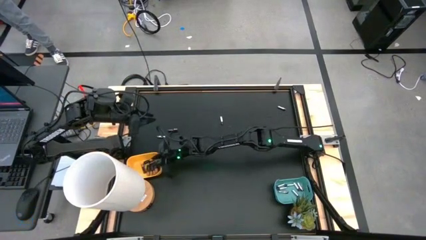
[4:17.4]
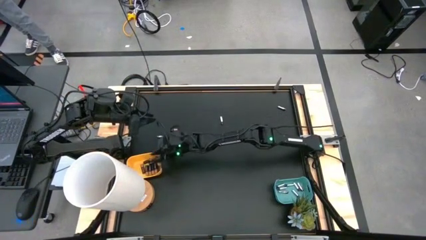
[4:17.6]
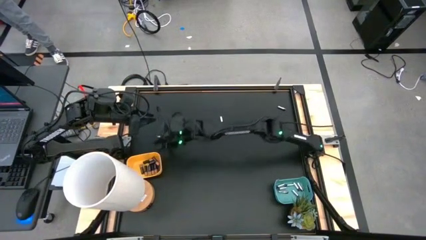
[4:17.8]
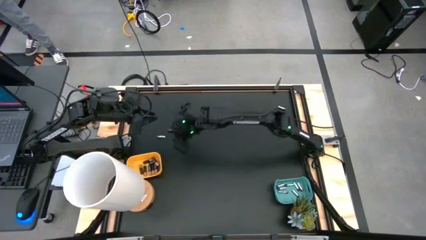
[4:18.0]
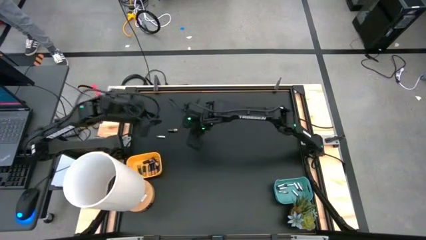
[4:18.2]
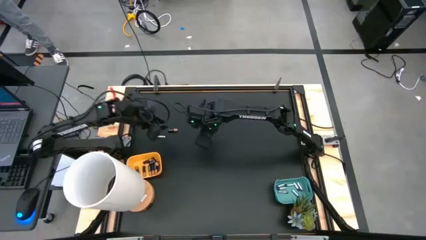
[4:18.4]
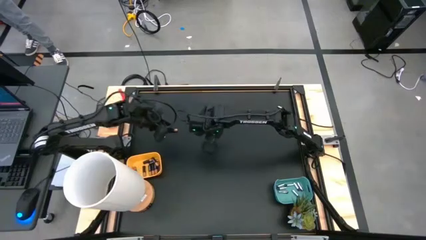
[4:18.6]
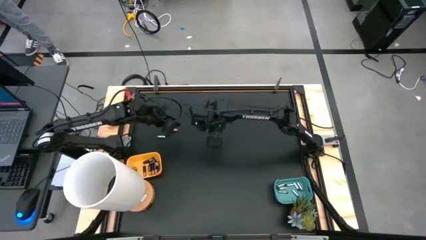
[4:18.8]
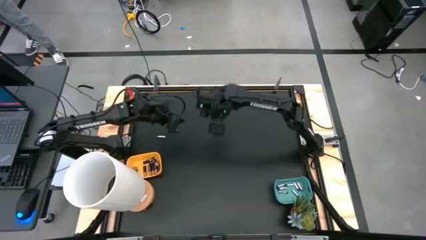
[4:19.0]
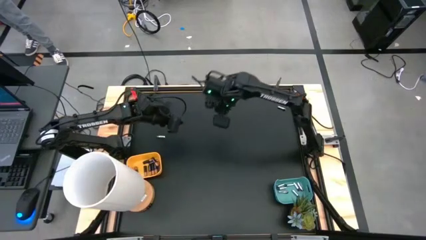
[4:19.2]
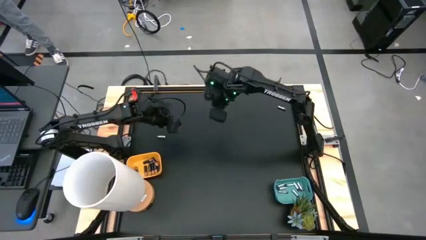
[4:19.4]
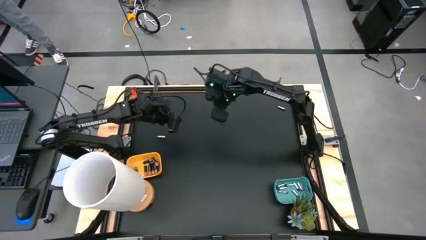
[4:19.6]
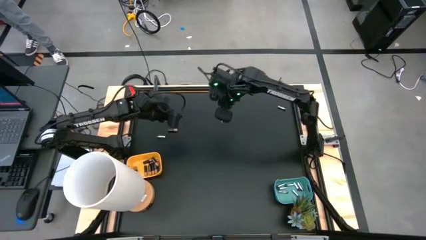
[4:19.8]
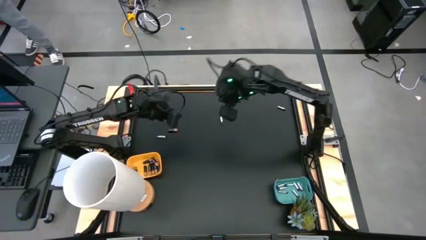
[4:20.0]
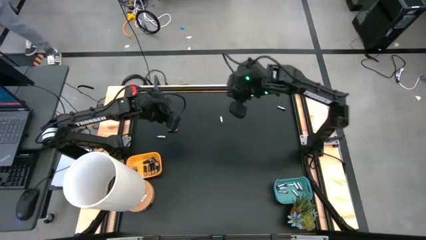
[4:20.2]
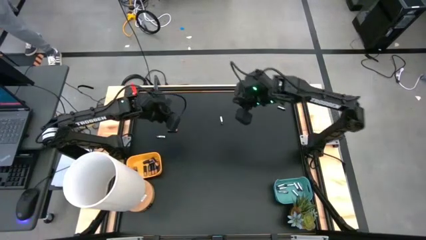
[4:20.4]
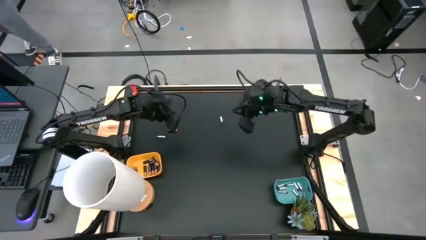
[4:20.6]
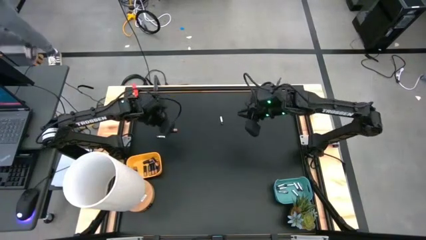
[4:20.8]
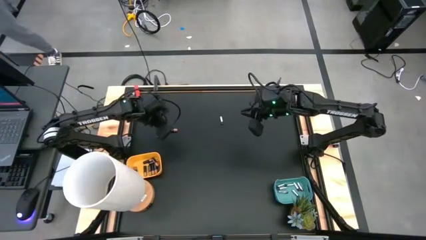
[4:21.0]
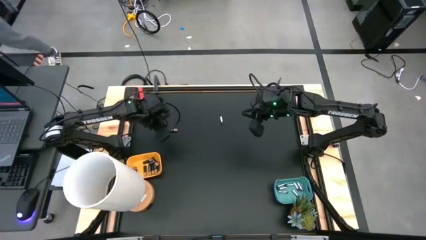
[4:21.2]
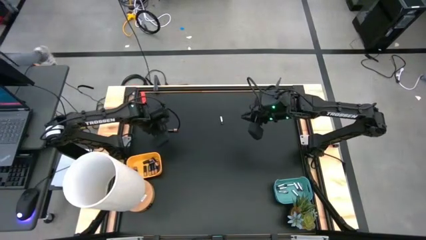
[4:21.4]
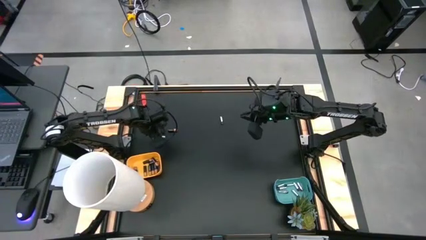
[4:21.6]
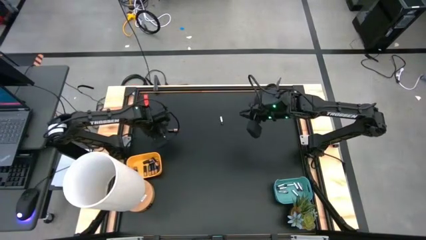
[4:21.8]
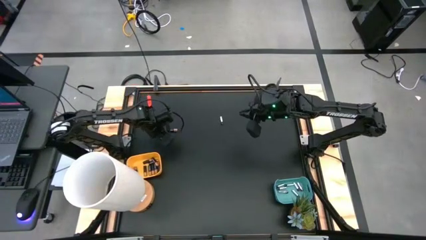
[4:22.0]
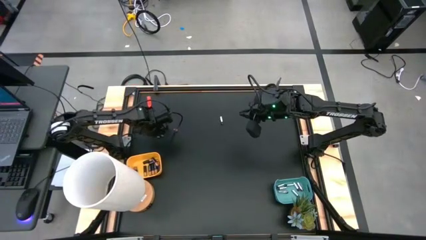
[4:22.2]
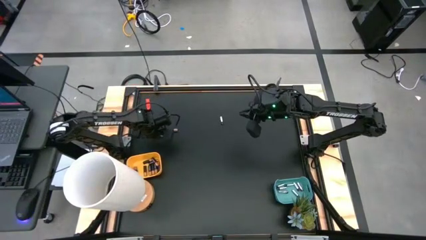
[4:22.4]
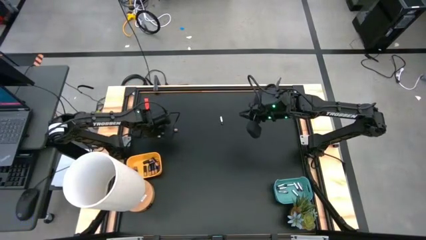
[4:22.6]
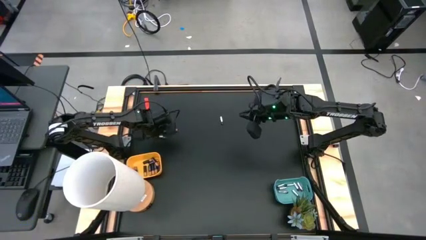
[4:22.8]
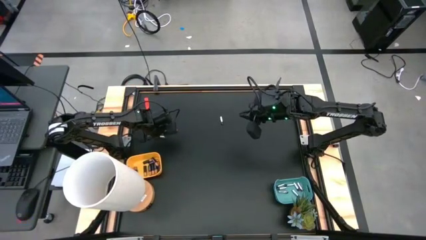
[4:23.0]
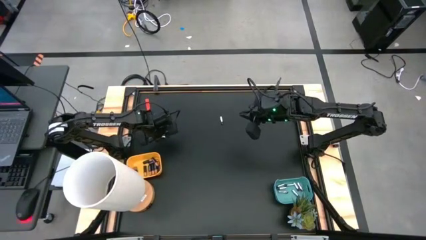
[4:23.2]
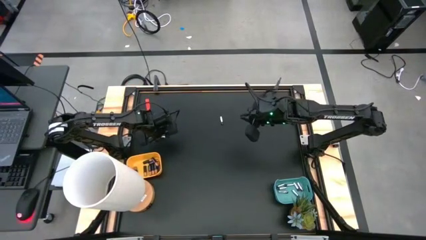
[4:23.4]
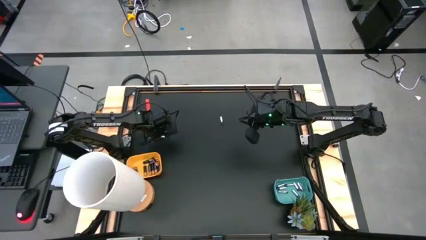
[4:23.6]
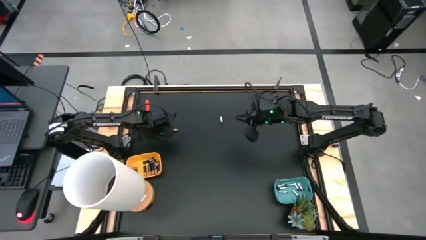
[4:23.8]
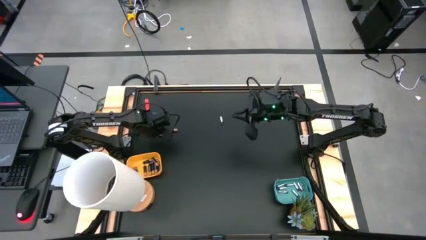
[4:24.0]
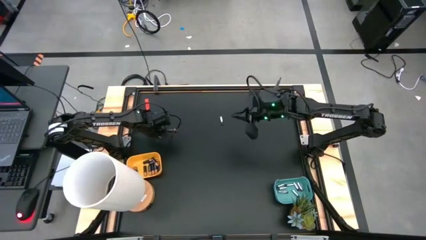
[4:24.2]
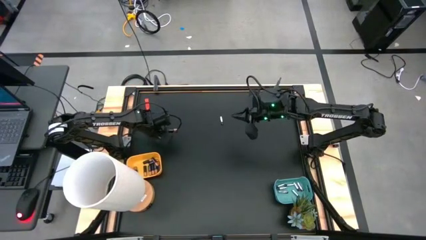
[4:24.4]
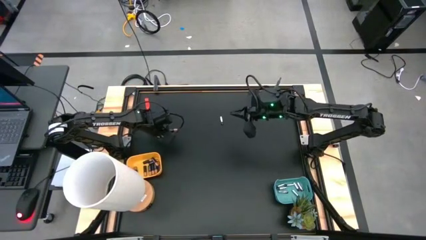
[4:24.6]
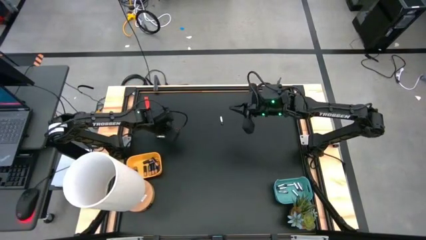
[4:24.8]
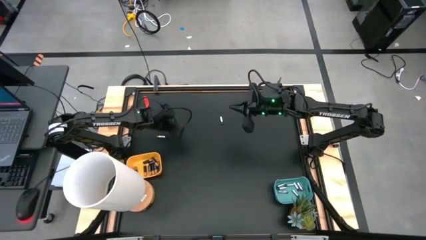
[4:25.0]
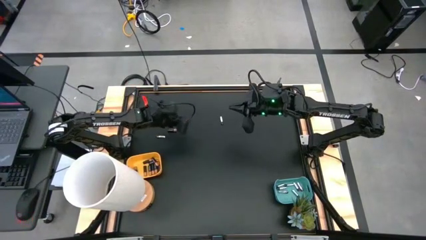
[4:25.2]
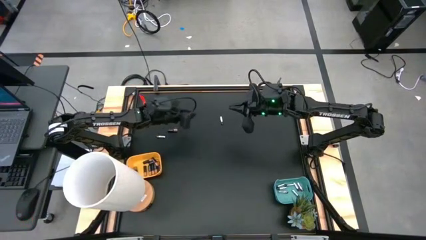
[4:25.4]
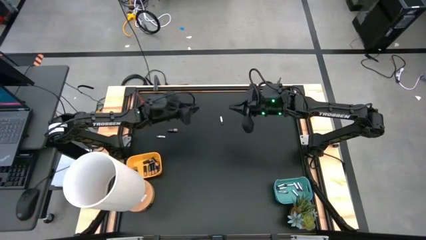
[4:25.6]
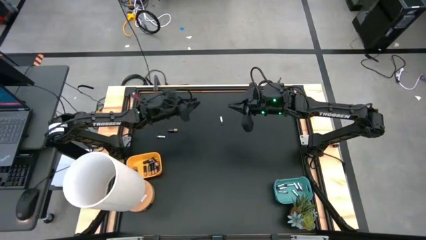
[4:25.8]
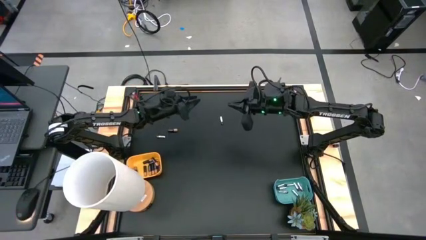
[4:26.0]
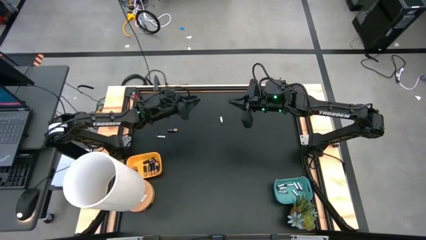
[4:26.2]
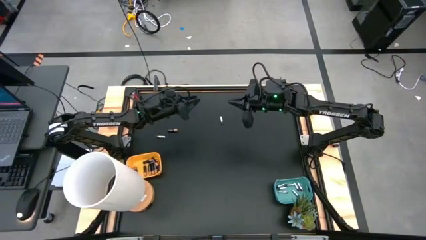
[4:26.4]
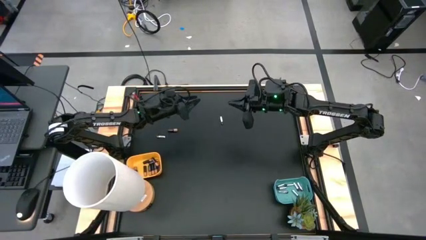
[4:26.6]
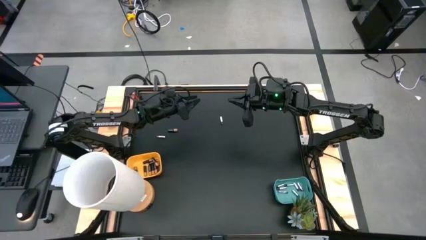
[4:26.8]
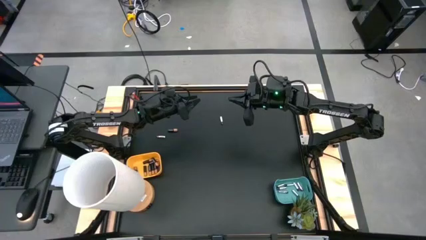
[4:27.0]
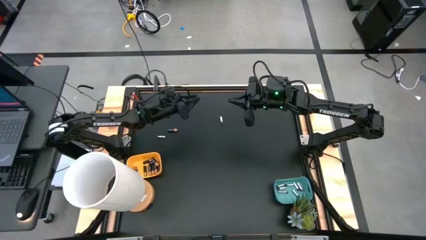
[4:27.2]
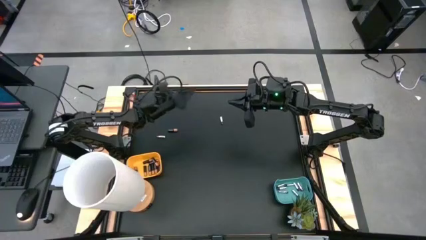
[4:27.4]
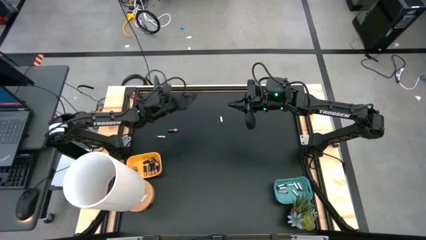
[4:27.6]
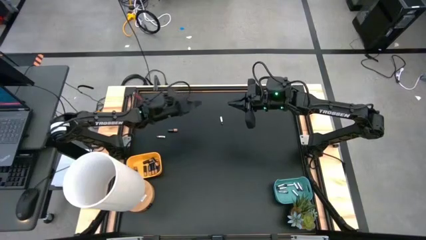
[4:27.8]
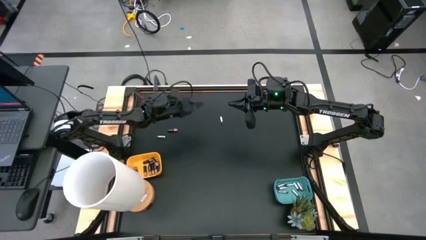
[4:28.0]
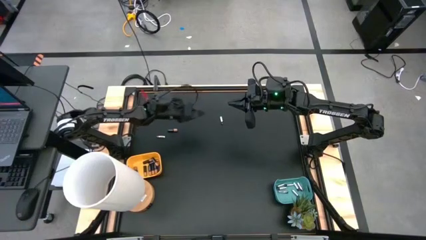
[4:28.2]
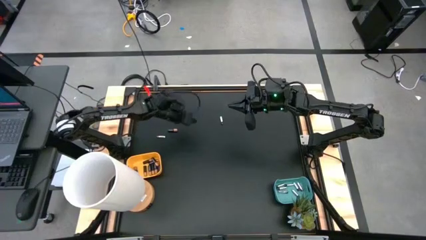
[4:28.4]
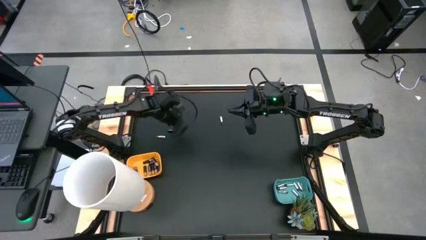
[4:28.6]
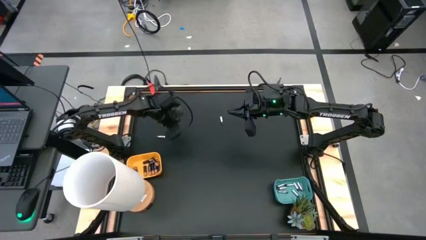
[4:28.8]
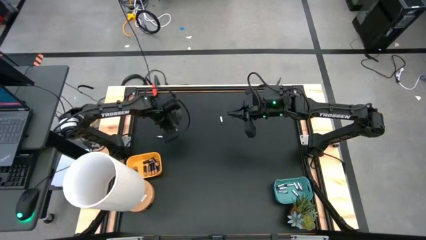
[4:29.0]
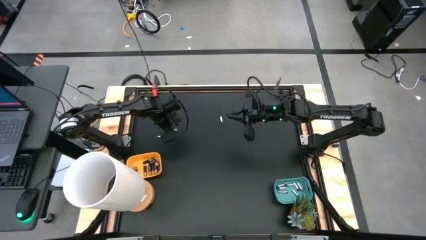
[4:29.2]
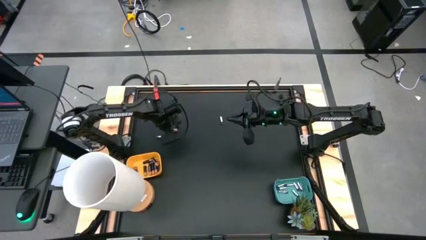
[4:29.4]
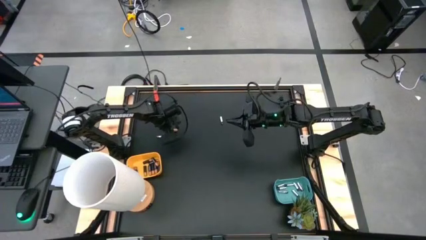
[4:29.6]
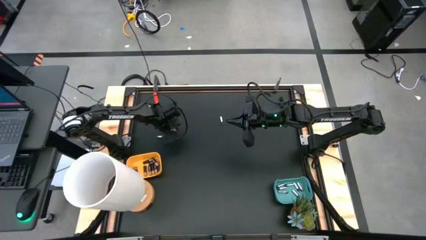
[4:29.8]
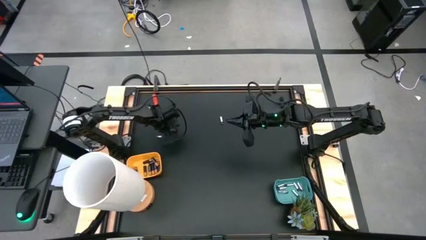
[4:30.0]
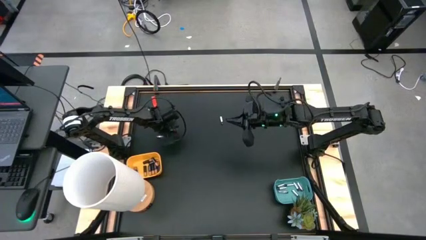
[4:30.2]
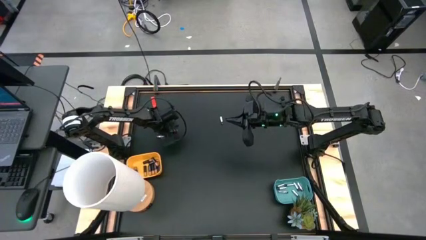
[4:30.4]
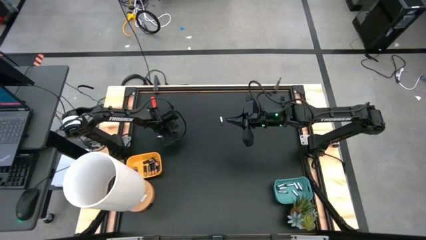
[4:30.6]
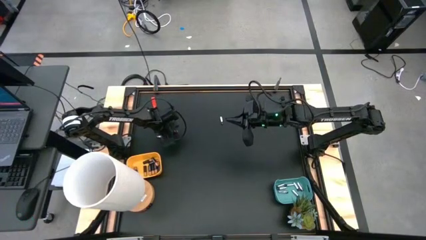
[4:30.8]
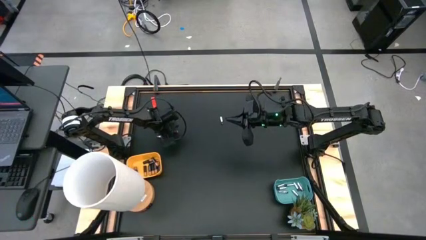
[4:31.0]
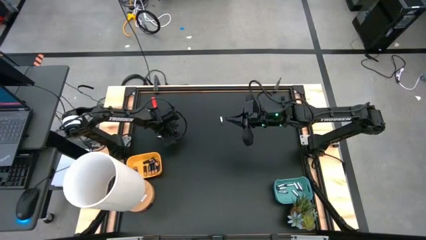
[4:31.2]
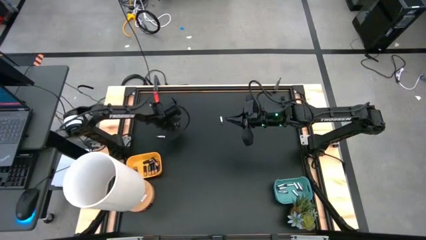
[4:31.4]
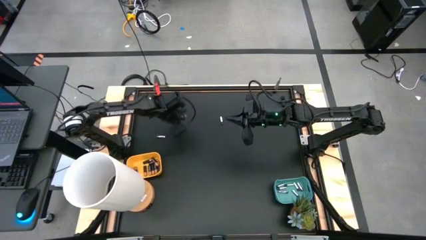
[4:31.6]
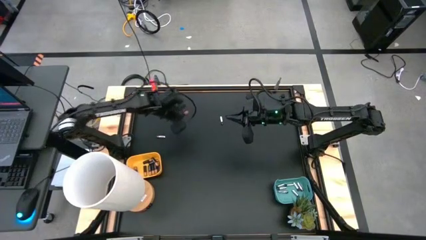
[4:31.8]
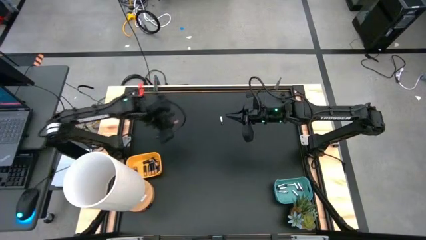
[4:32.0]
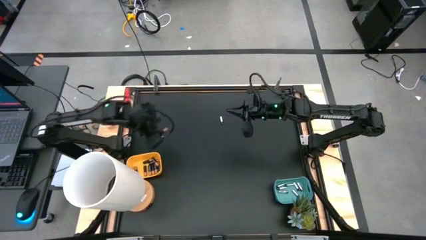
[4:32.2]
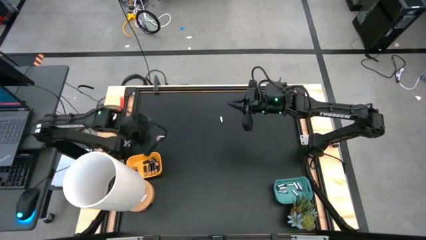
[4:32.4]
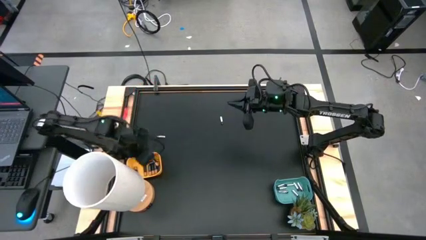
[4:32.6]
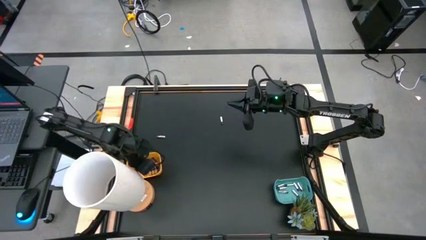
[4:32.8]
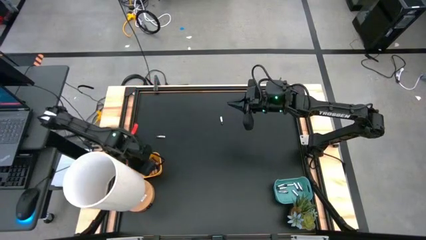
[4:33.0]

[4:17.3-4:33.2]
Task: Sort batteries
Put the black battery into the yellow bin

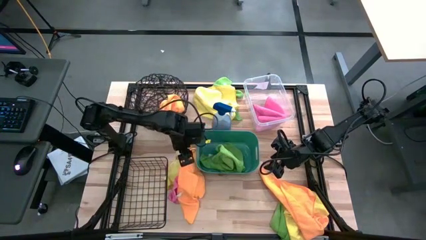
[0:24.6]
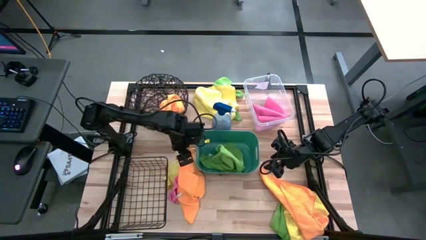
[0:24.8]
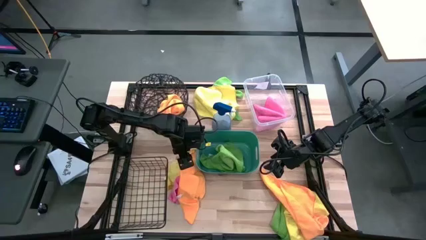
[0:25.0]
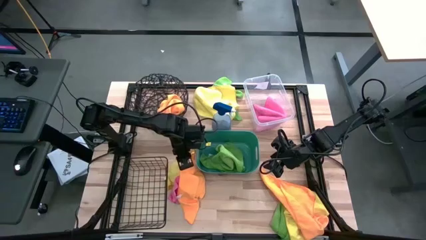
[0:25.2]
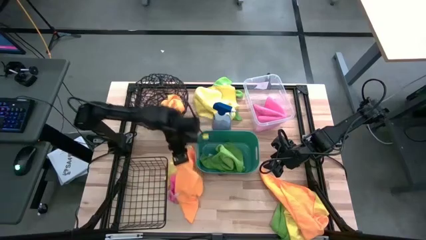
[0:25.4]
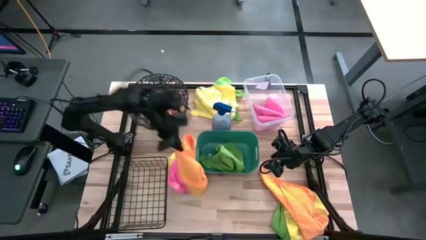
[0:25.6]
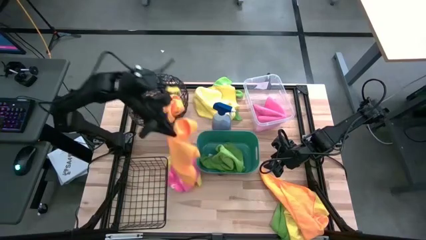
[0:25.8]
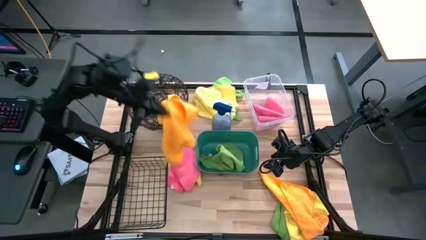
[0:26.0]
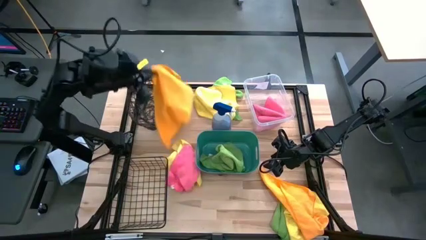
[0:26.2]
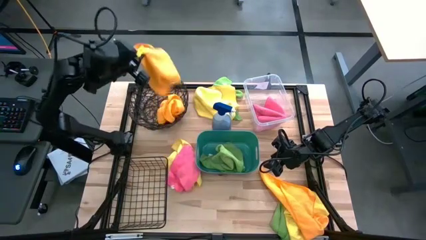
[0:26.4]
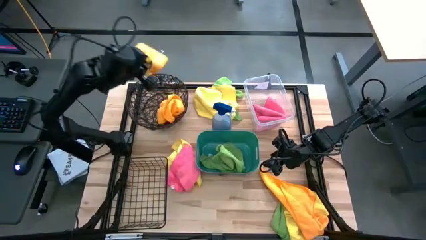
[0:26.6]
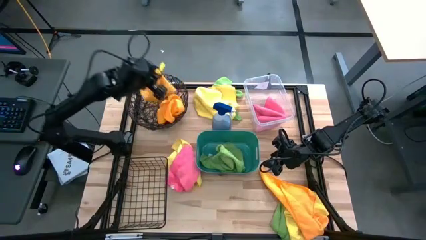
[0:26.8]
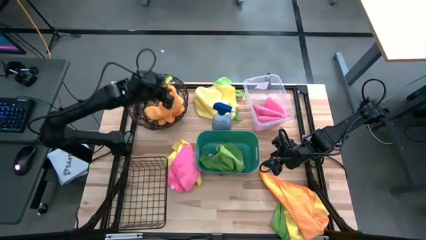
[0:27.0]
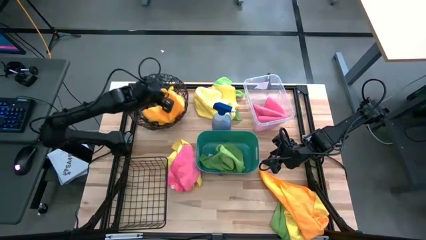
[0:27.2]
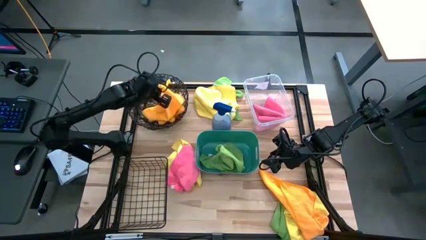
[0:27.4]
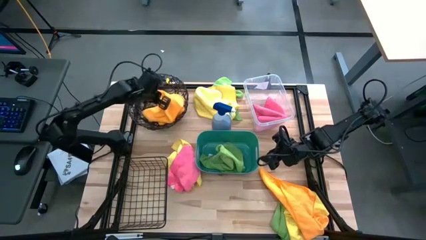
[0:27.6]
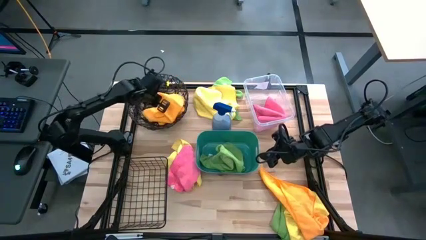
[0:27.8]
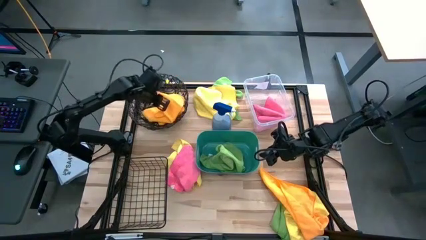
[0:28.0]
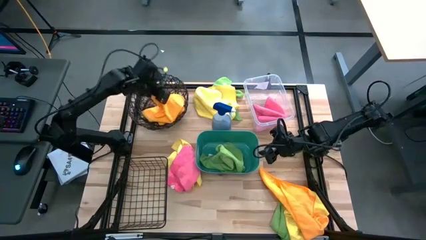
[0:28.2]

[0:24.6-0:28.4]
Task: Sort microfiber towel by color & place in baskets
Put the orange towel into the circular wire basket
